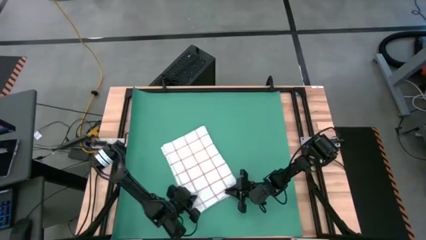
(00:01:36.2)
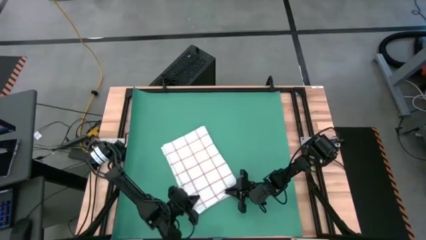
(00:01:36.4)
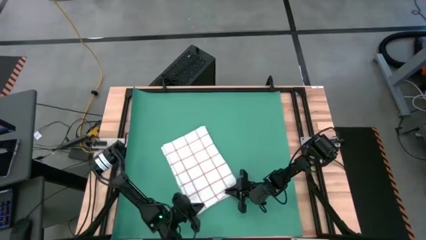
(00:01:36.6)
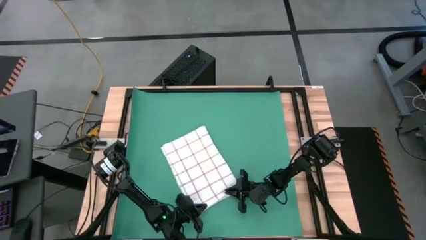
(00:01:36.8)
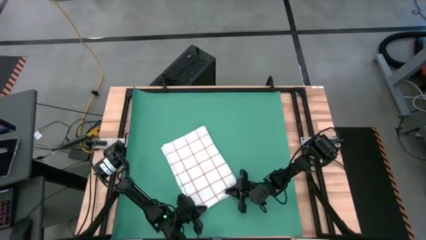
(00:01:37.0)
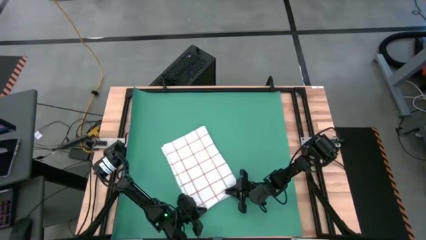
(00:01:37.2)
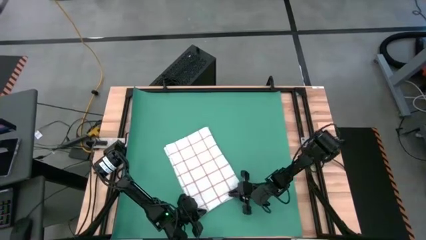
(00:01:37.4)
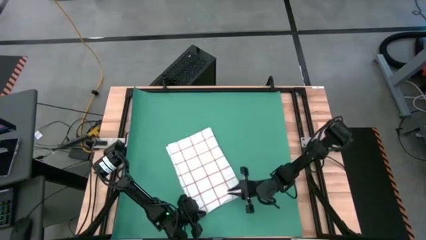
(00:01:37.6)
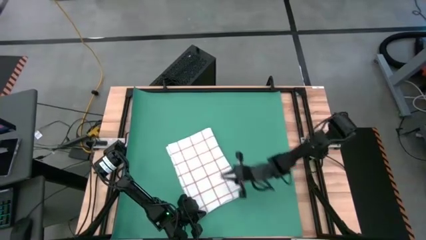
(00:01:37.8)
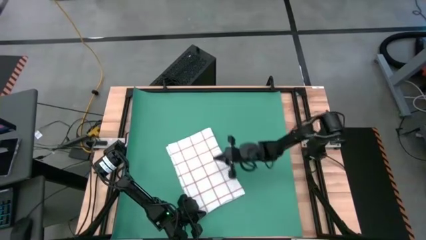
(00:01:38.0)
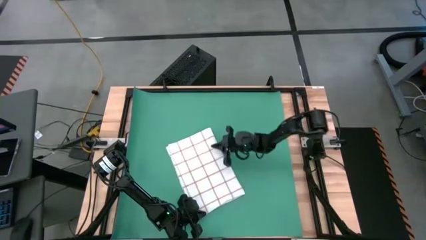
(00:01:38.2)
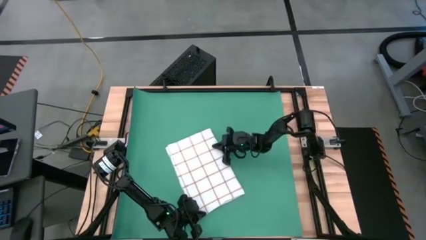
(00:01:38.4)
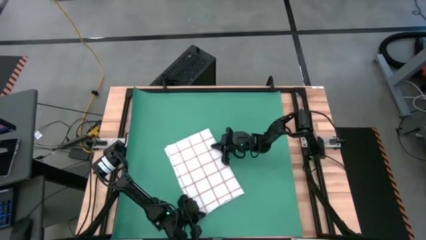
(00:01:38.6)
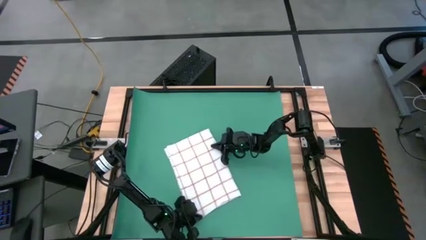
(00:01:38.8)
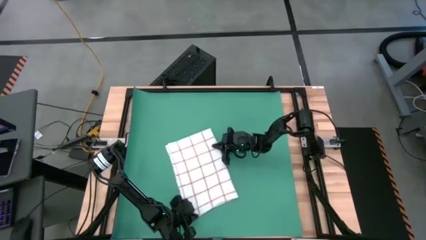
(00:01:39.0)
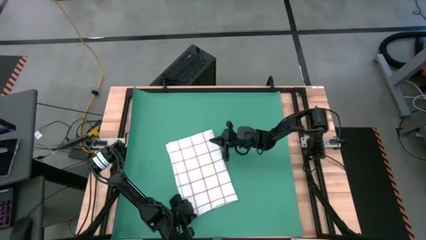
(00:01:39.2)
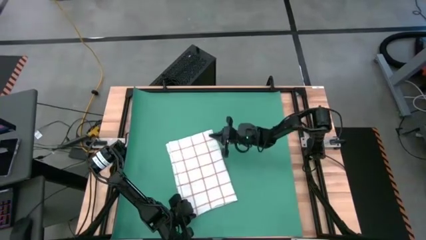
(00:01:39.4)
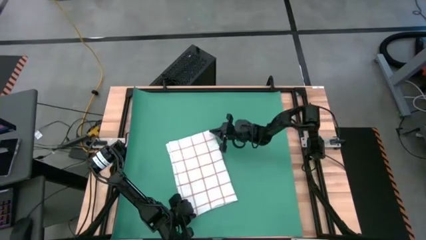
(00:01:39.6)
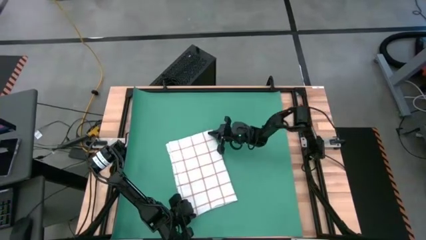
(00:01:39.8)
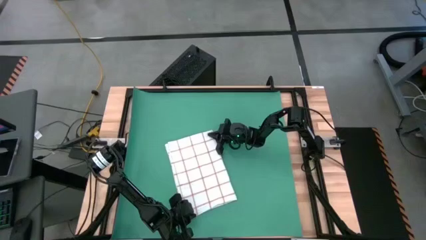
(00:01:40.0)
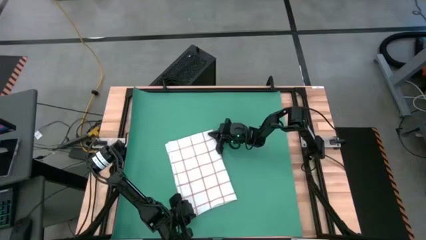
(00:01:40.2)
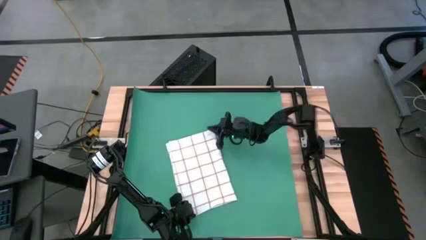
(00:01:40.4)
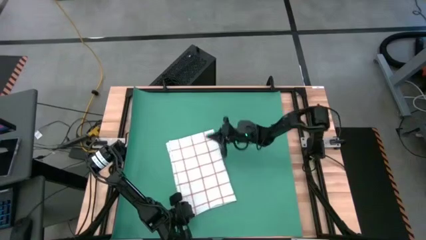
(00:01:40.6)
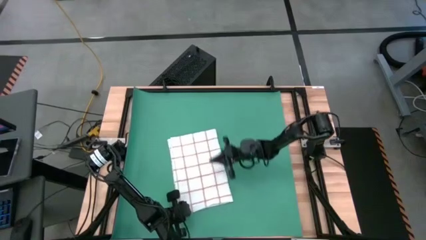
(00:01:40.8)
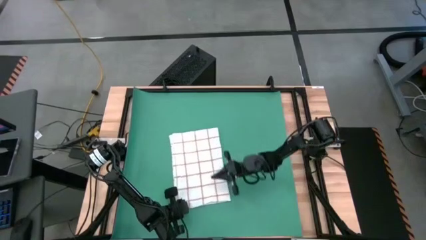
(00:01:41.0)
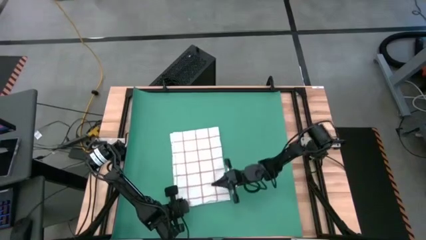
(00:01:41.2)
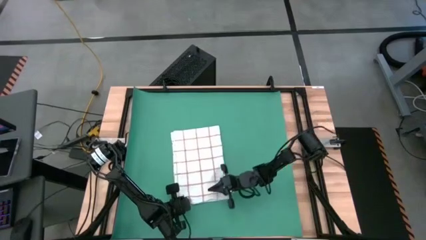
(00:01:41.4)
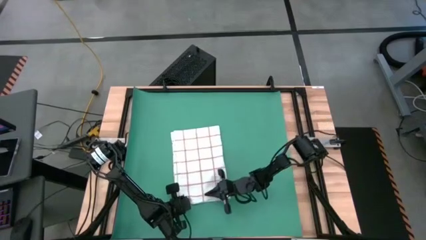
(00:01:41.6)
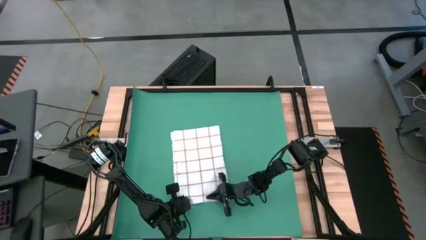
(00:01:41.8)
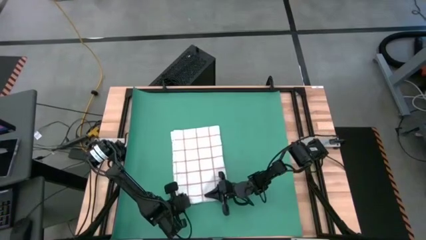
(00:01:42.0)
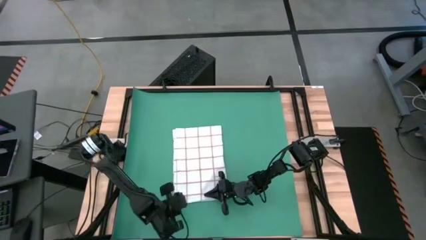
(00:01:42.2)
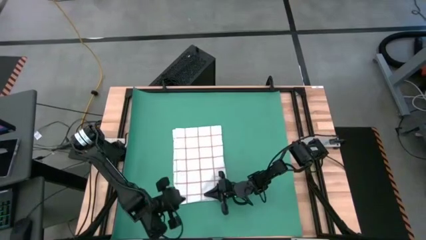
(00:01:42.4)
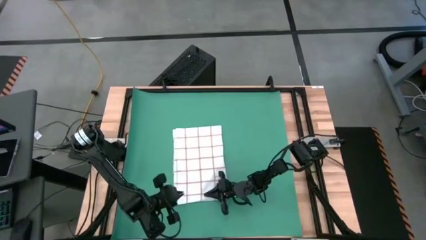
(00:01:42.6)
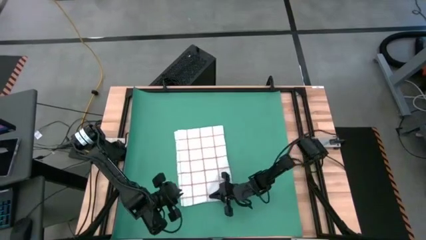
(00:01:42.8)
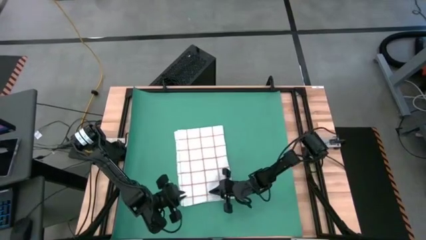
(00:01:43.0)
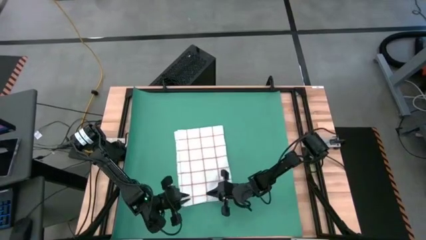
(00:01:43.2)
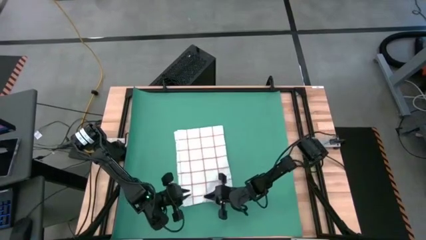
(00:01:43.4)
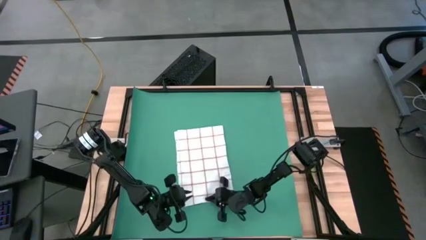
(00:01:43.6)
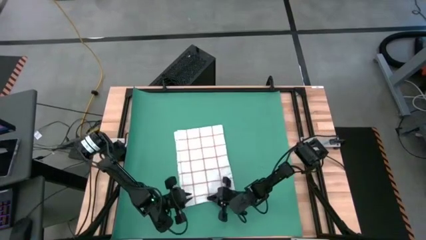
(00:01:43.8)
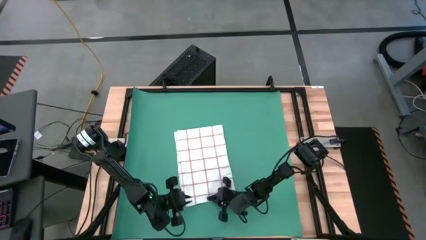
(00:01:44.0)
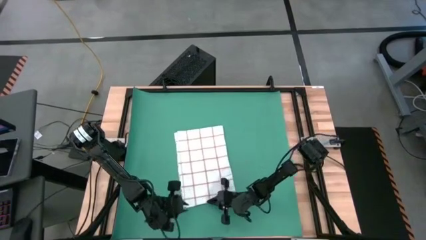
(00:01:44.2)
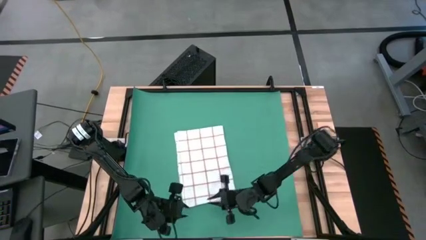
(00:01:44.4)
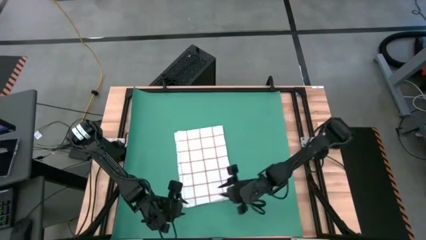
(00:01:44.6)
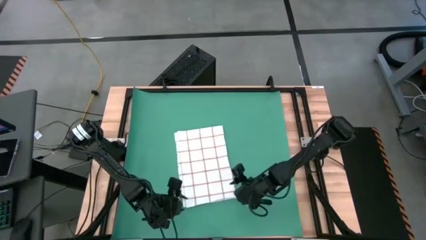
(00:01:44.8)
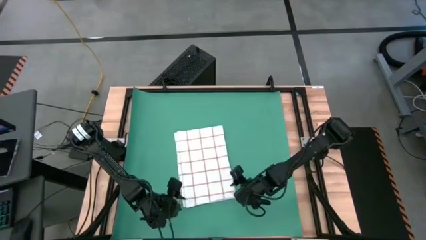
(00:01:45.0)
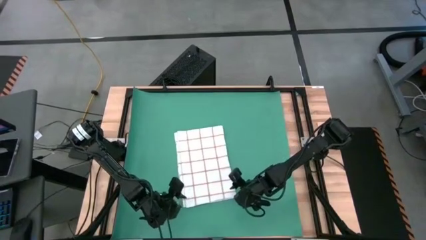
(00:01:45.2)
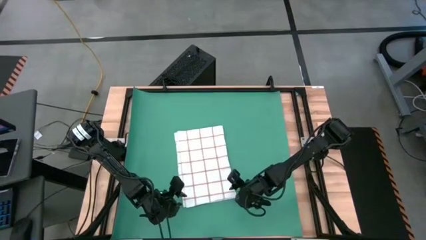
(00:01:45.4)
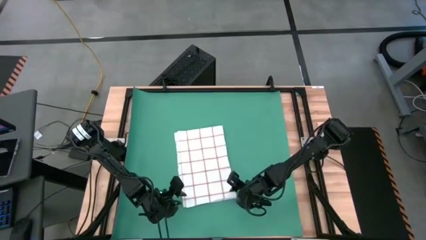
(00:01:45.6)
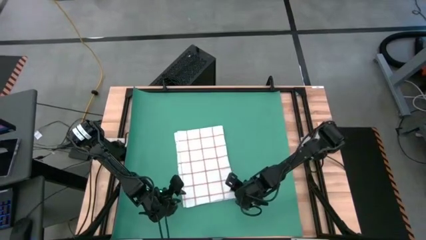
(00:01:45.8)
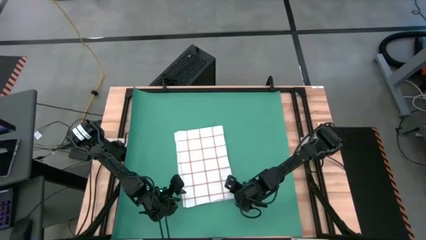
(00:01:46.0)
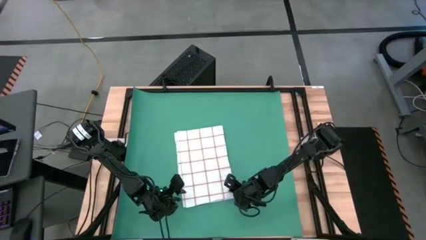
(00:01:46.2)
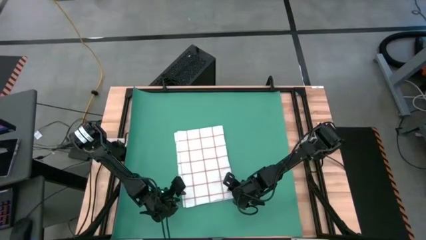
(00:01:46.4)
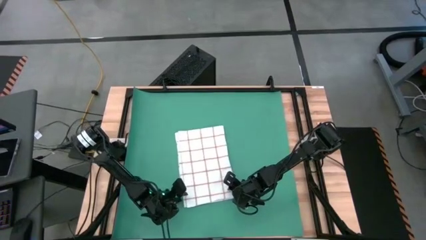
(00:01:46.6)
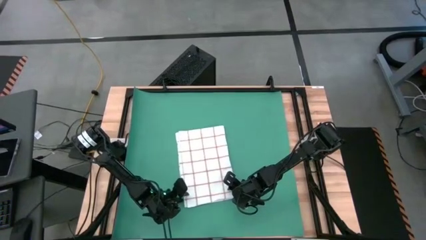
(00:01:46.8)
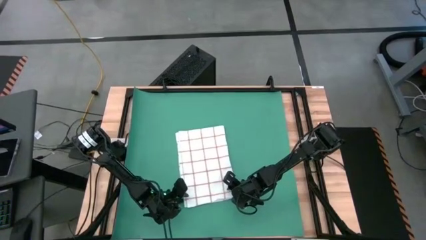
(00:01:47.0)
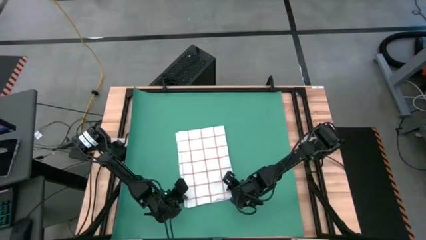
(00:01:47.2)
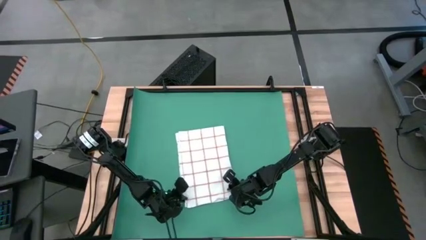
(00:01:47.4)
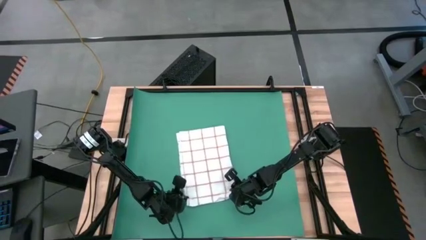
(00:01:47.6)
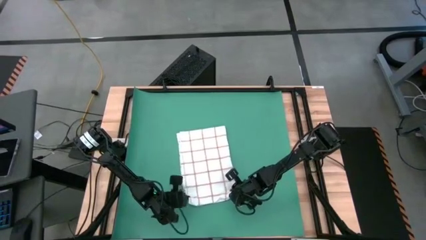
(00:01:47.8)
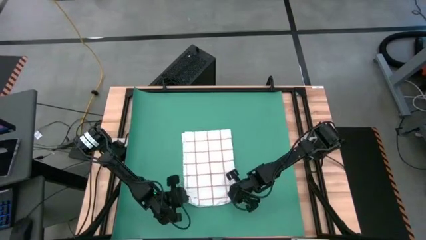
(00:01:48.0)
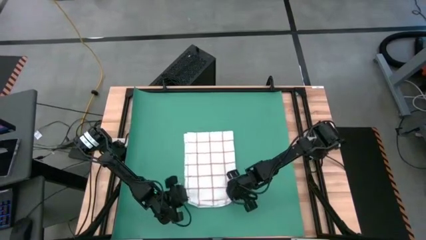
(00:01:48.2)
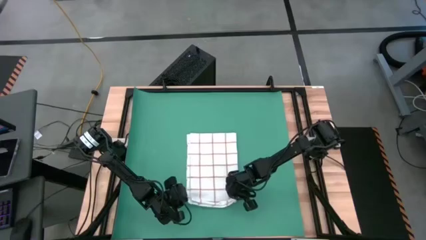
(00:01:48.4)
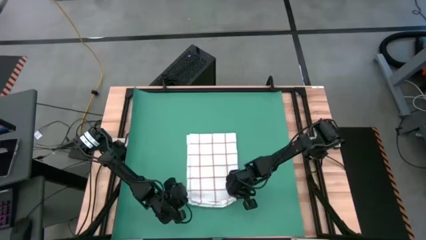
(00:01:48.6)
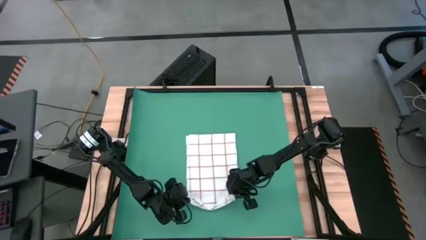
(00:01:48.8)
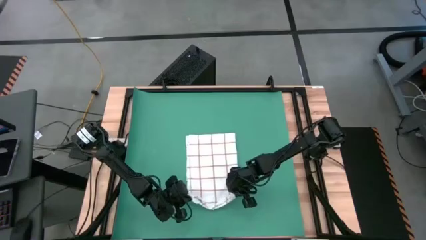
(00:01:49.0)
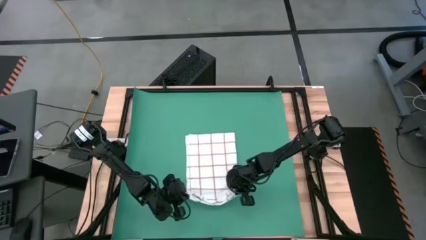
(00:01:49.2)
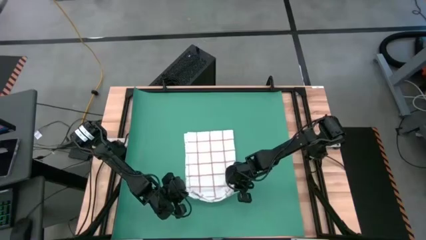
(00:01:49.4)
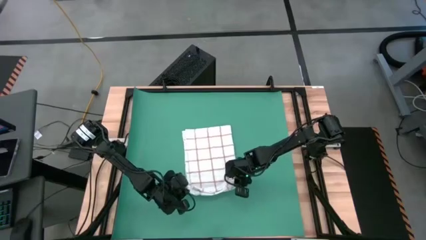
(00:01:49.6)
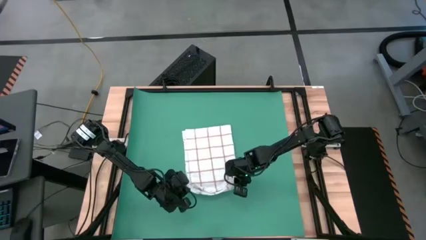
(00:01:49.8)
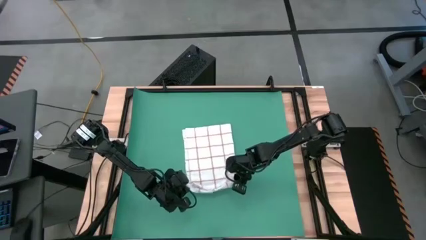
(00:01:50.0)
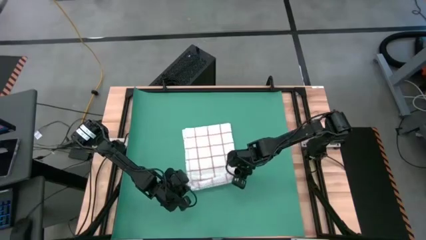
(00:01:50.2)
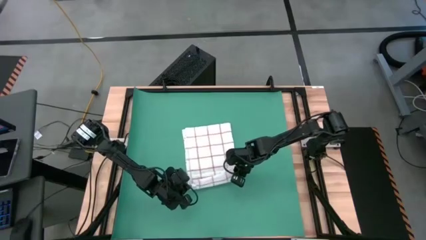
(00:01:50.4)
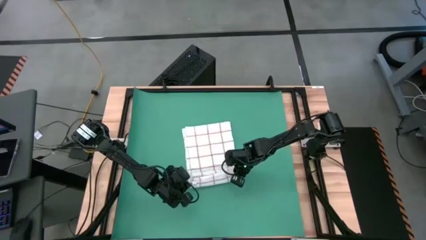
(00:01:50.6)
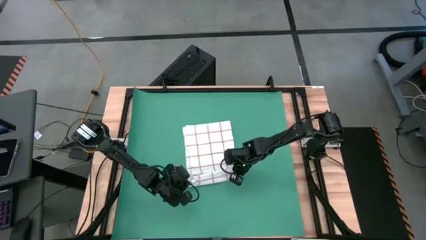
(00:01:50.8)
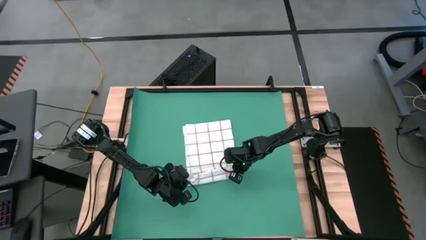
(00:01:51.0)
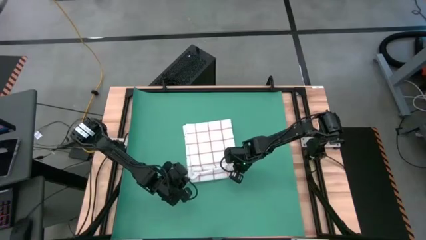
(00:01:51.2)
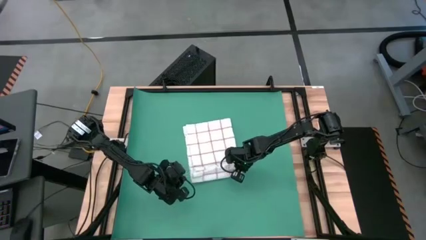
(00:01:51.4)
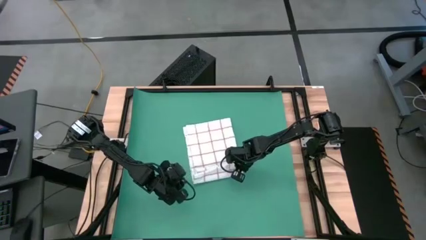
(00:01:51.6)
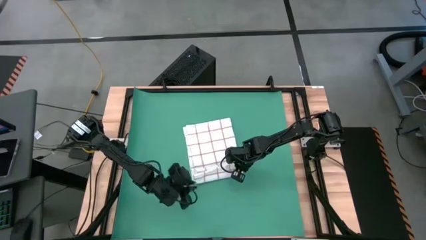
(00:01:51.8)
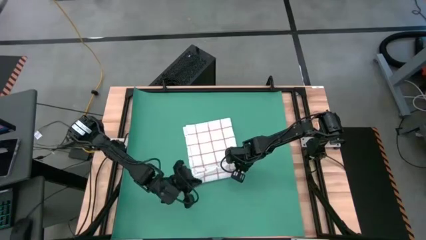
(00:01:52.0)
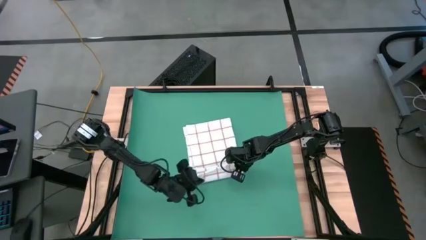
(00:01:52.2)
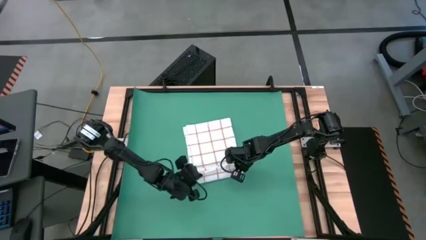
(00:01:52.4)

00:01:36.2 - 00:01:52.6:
Task: Roll towel
Roll the white towel
